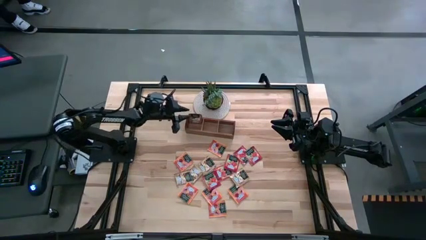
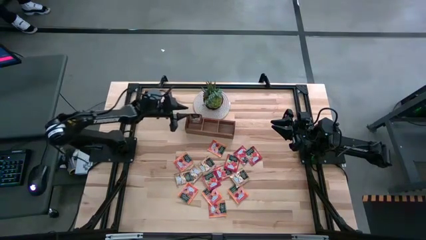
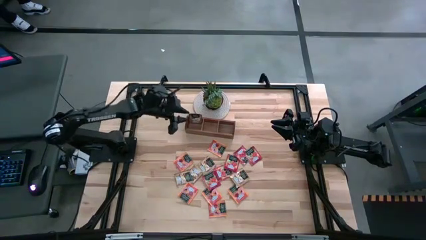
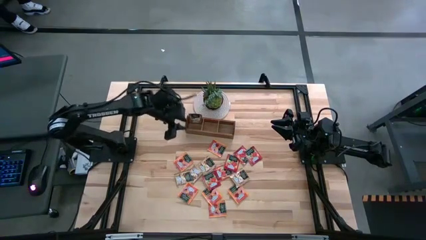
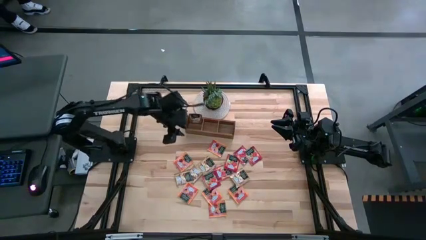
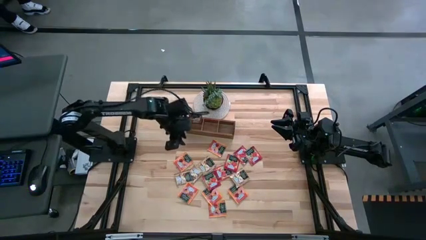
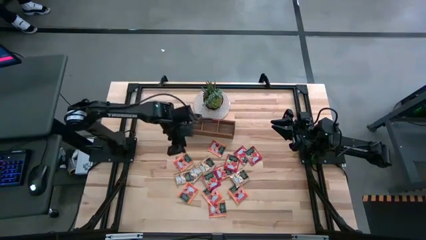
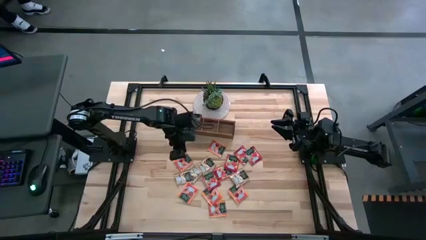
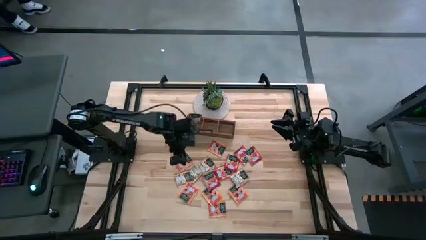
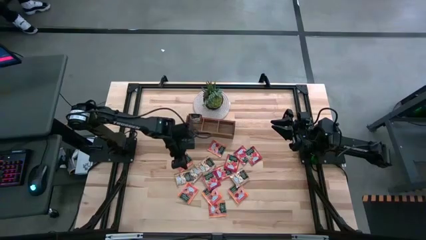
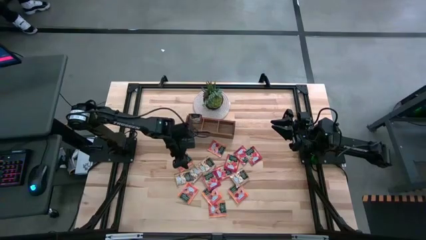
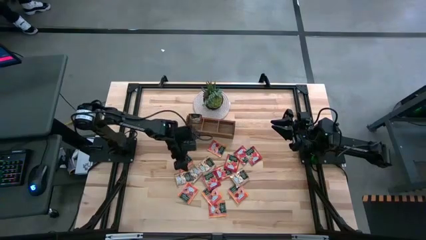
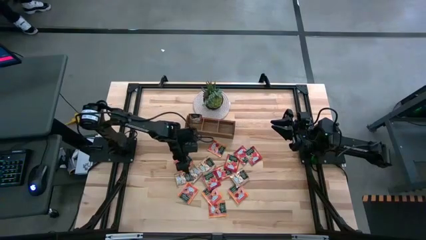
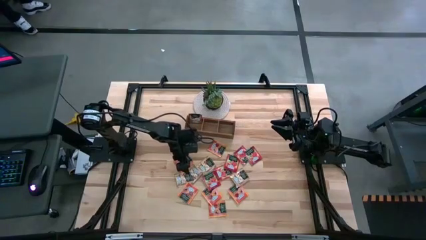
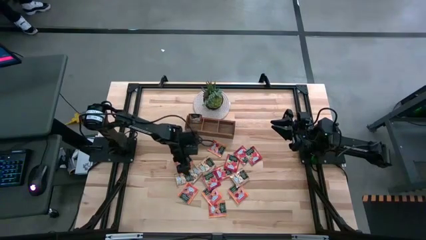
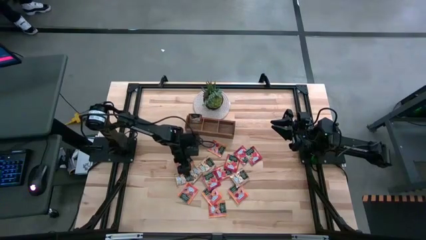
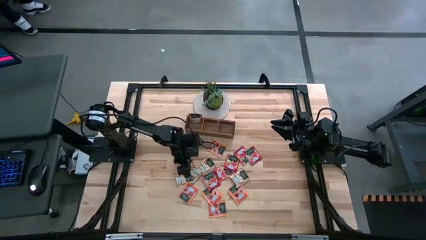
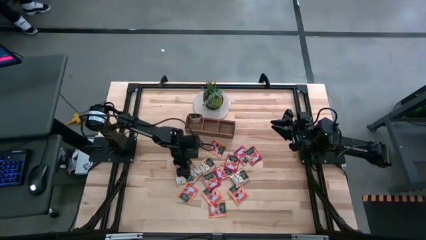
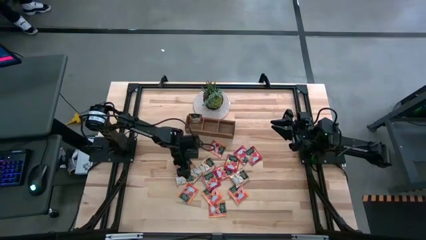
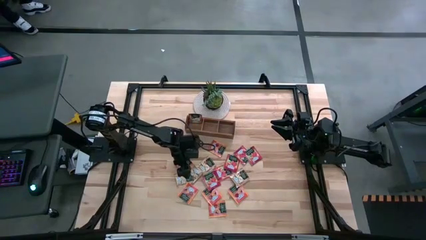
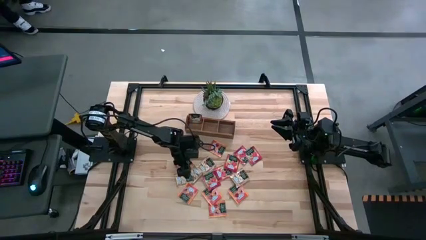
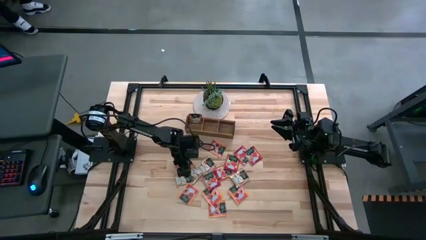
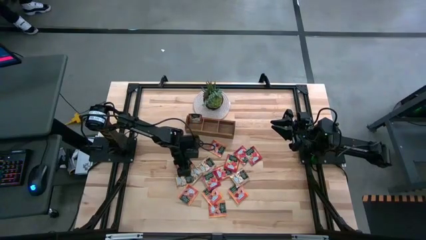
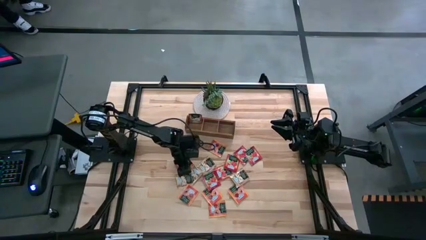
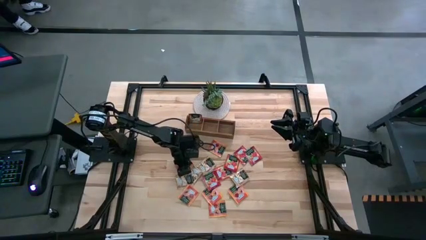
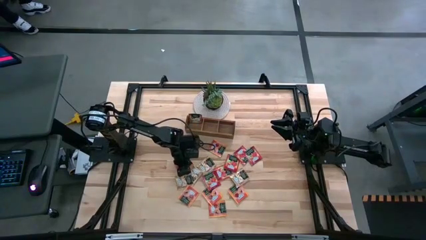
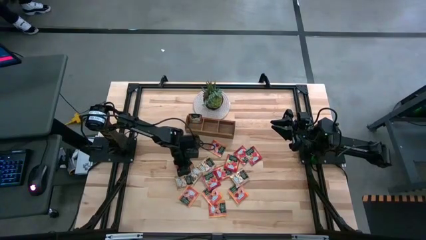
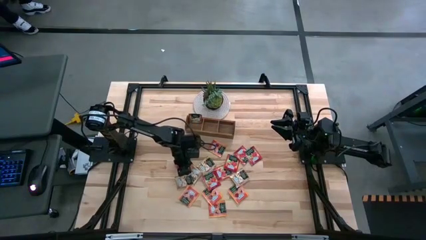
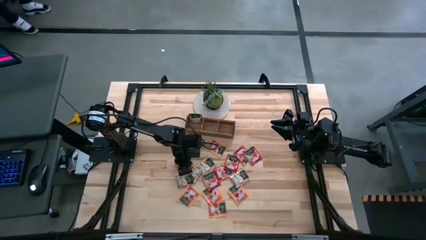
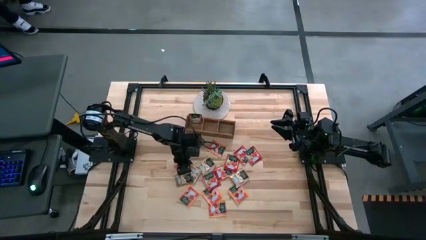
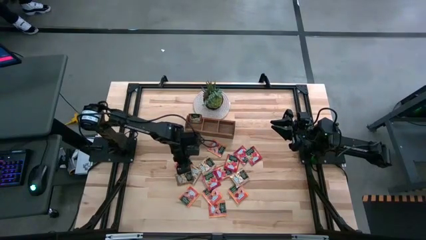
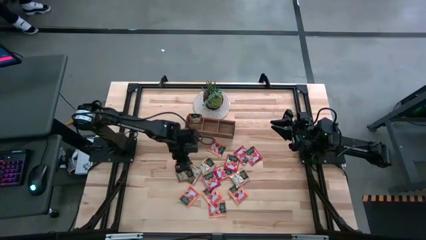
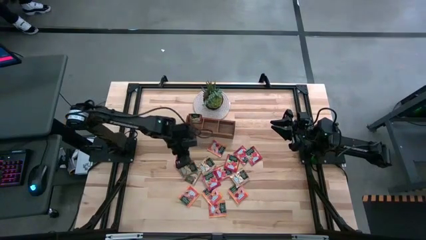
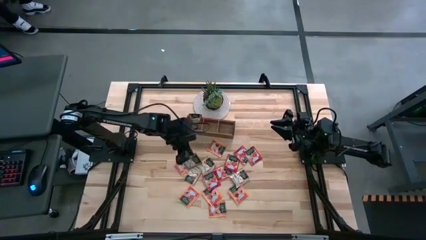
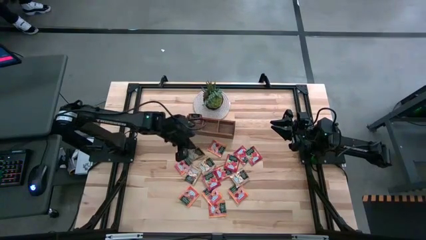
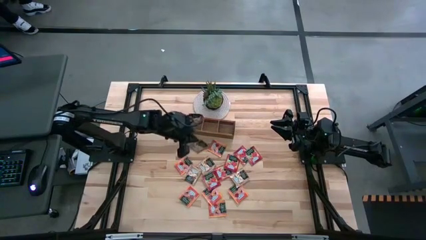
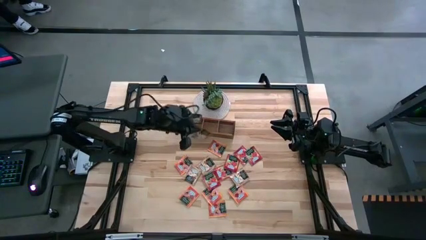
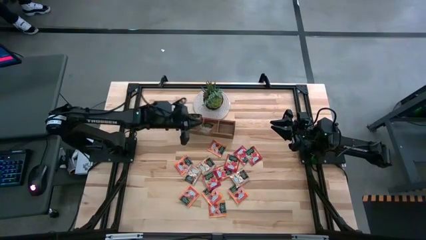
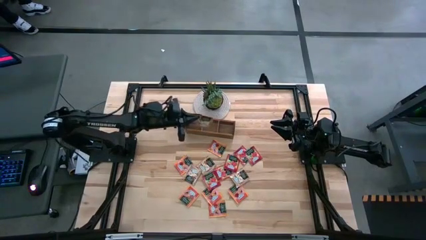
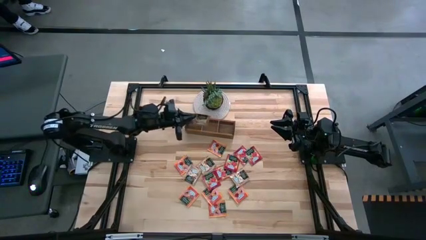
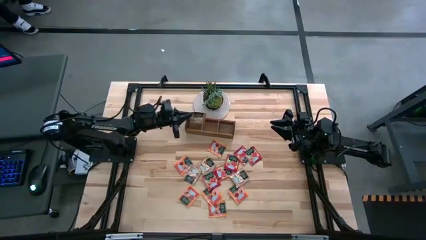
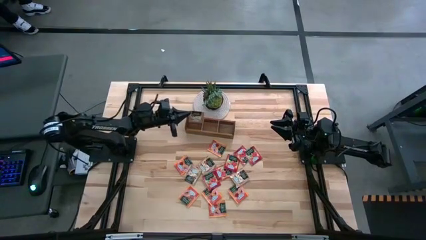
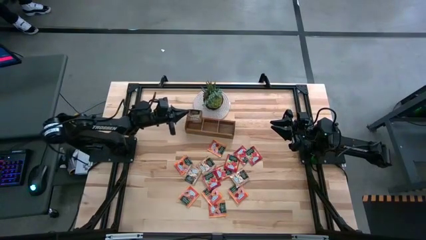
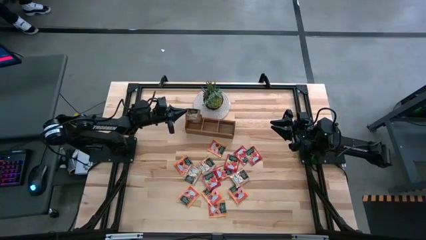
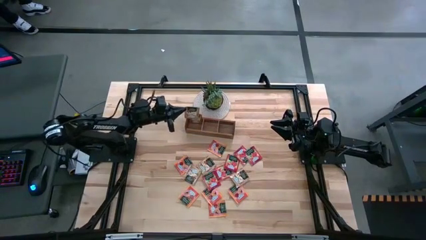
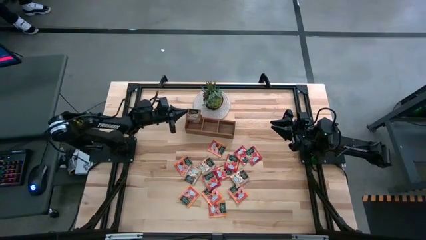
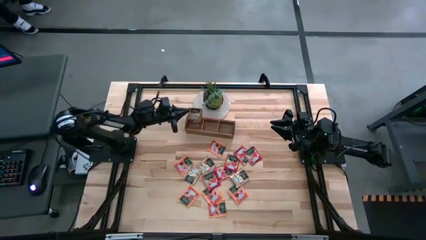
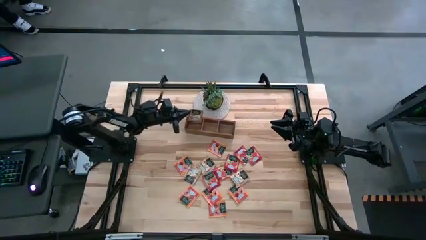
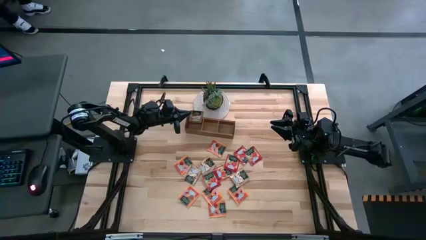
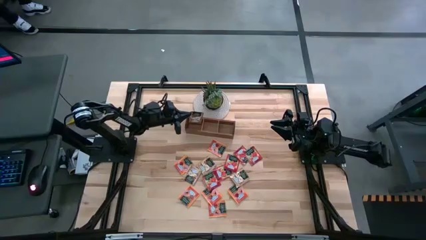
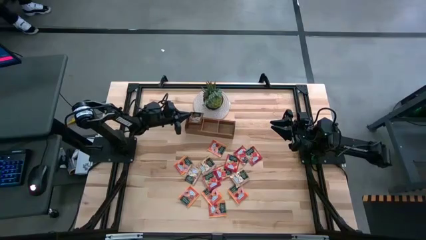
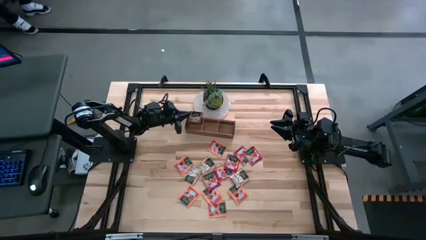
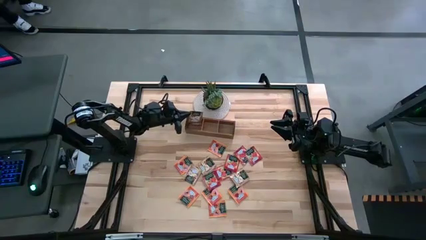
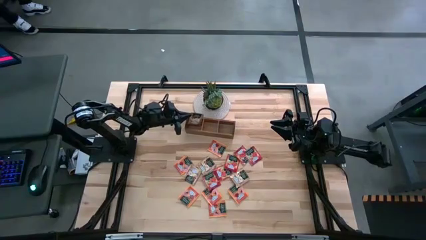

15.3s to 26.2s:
Task: Pick & Place Tea
Put the brown tea bag into the left section of the wooden organizer

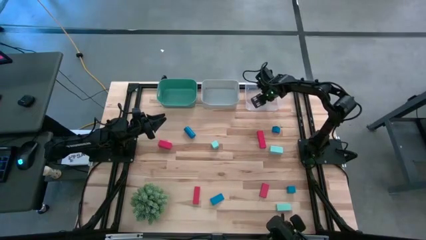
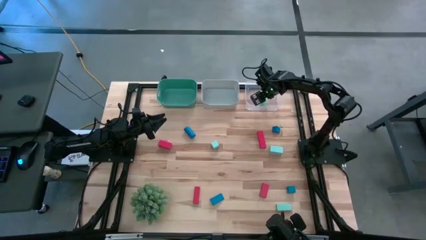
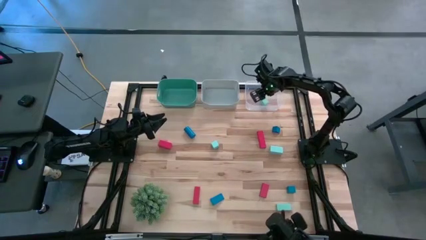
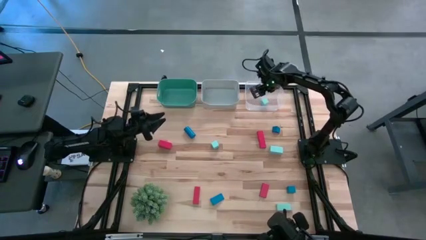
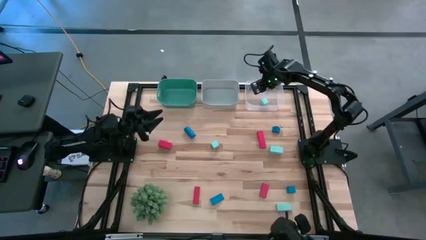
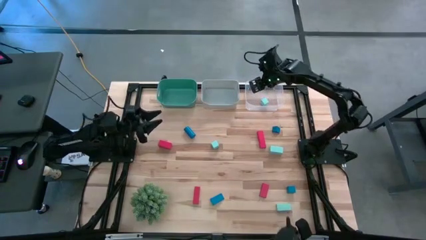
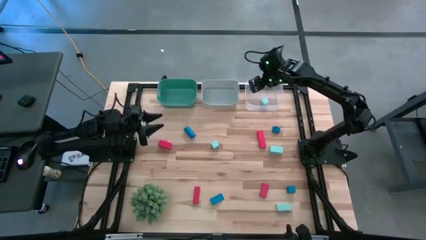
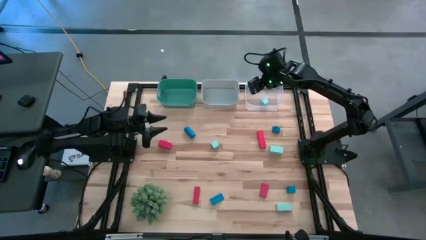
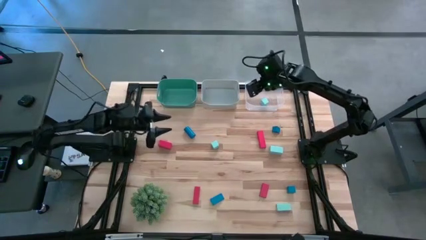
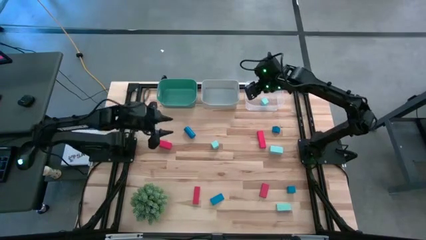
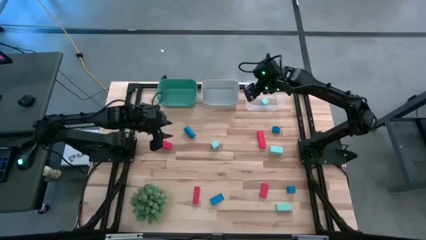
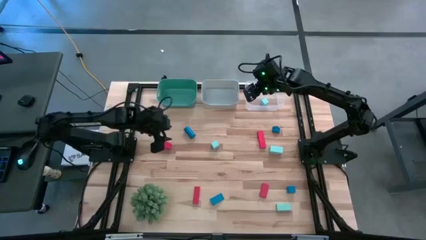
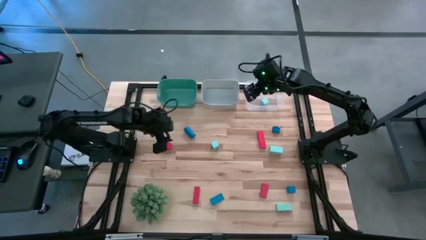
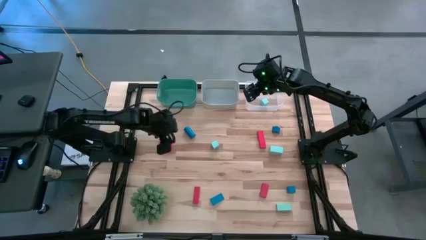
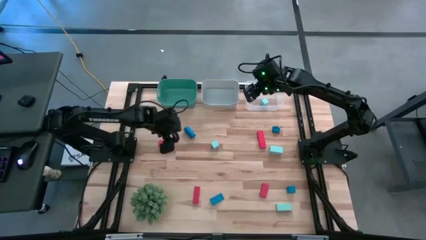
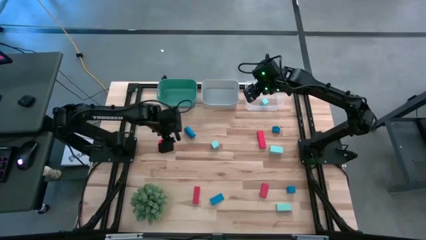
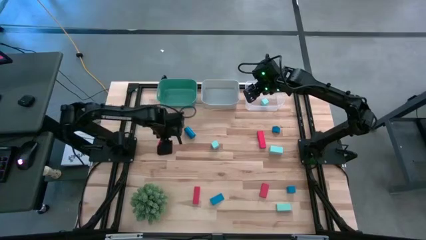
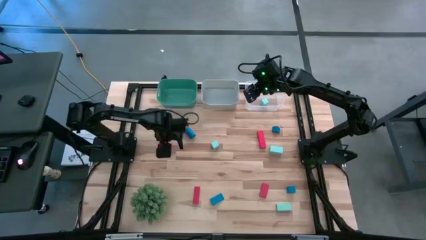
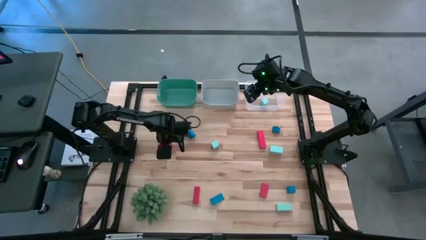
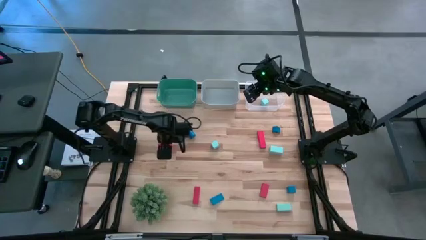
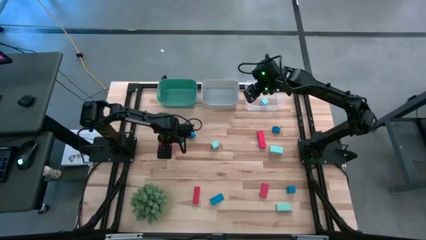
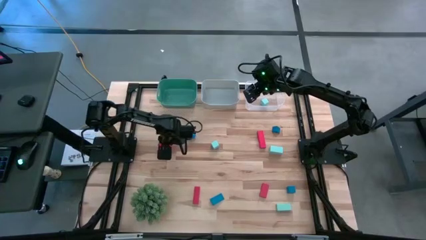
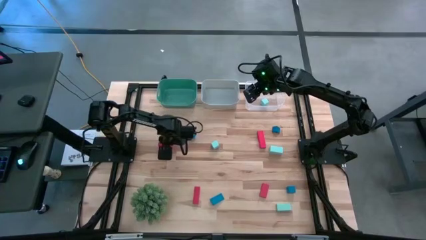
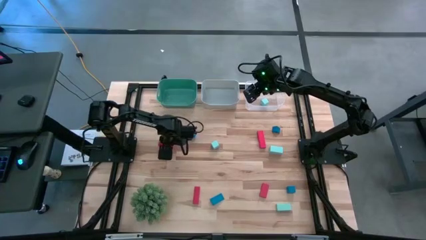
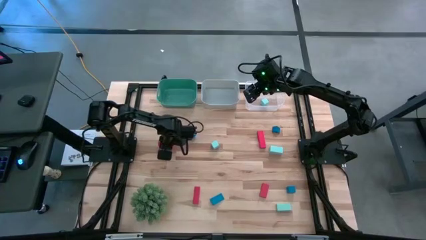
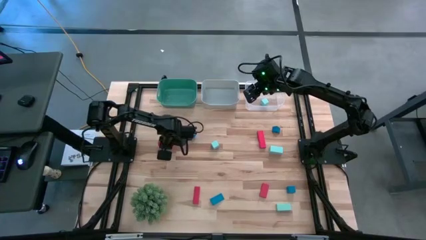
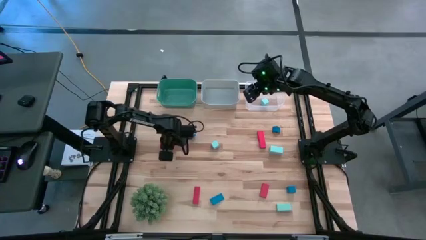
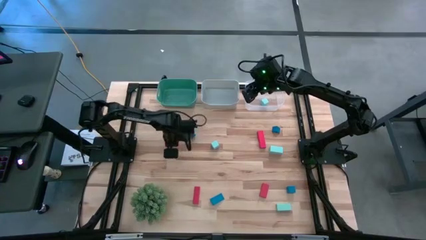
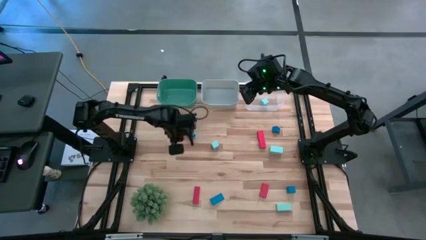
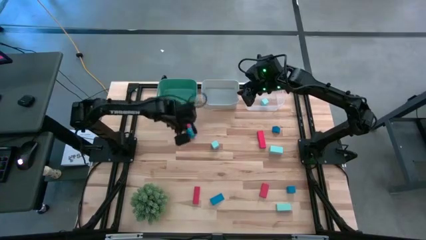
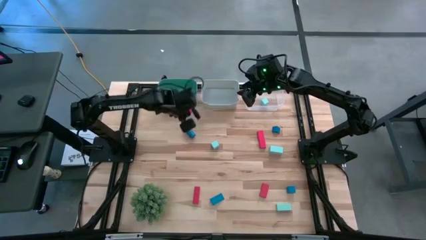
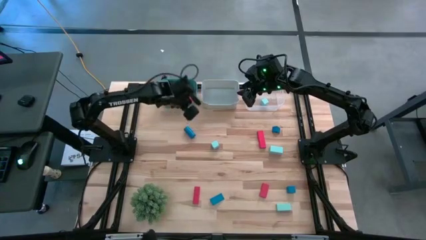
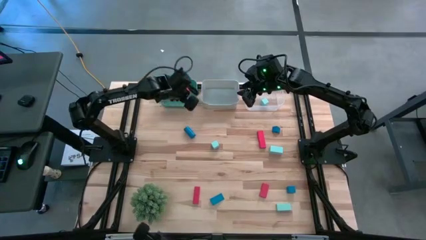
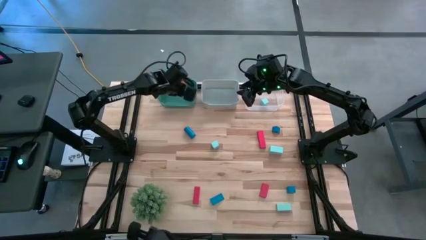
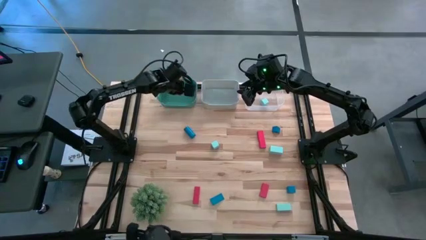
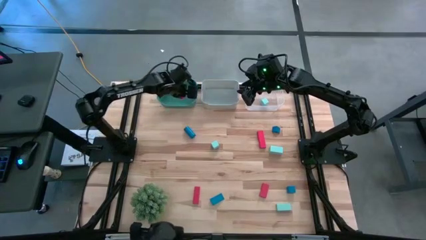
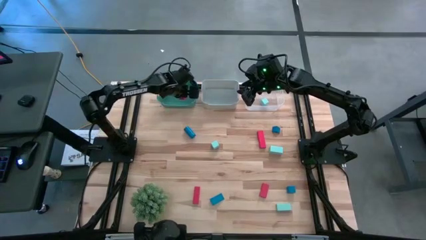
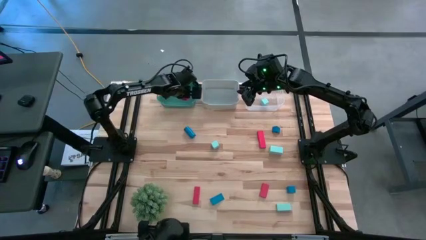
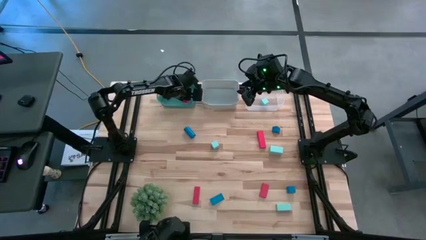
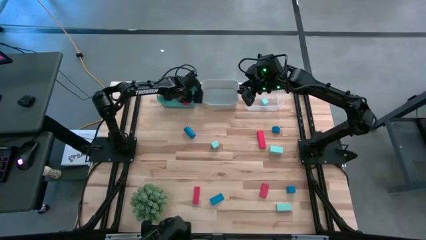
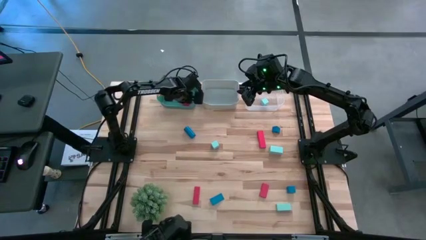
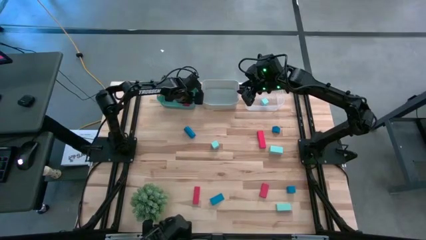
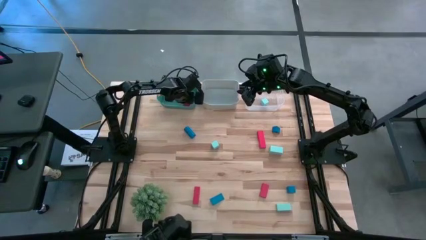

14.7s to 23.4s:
Task: Sort & place blocks by color
Put the red block into the green bin
